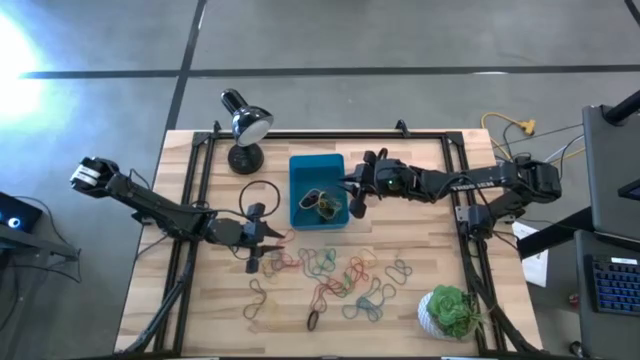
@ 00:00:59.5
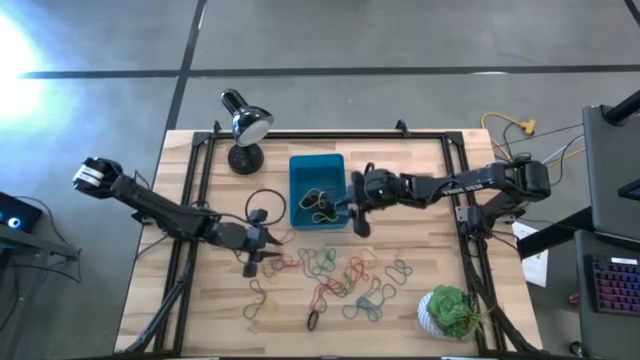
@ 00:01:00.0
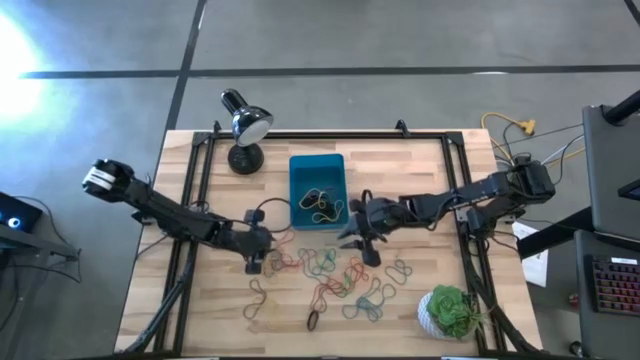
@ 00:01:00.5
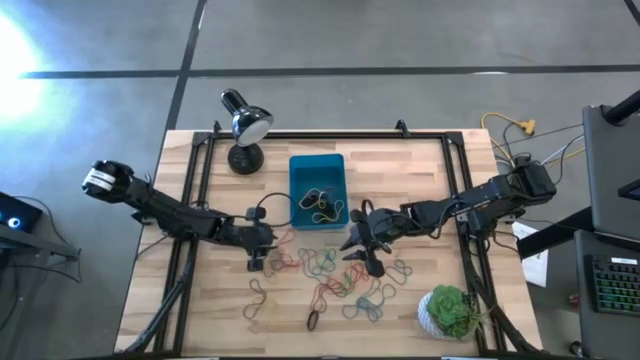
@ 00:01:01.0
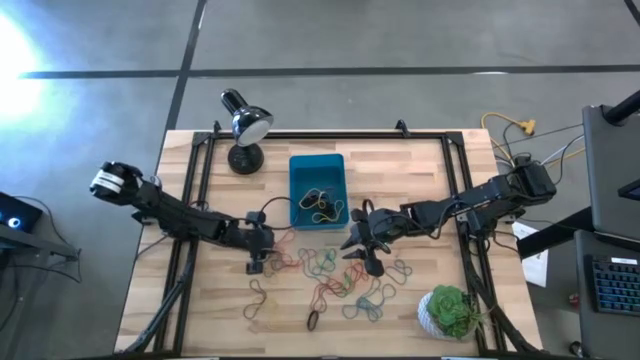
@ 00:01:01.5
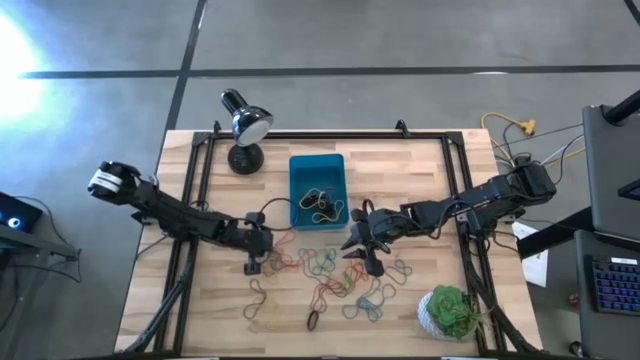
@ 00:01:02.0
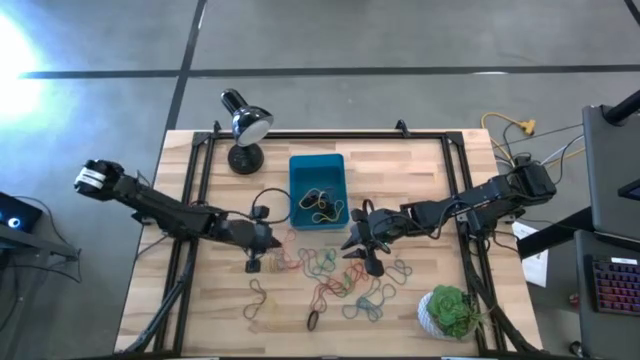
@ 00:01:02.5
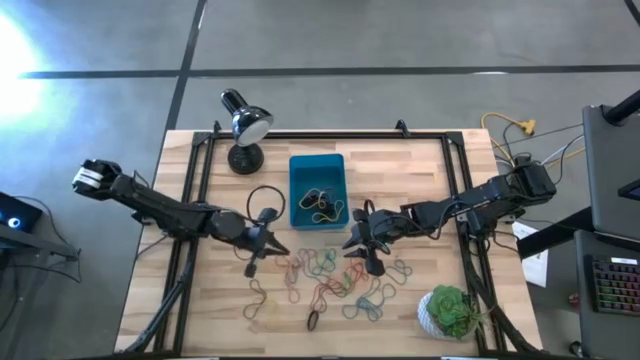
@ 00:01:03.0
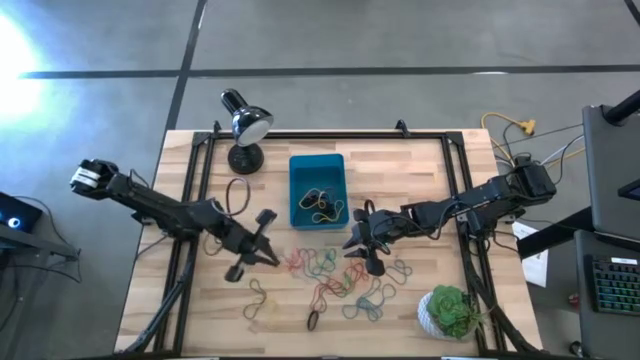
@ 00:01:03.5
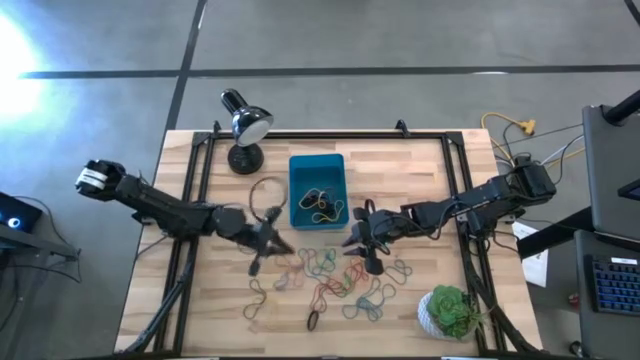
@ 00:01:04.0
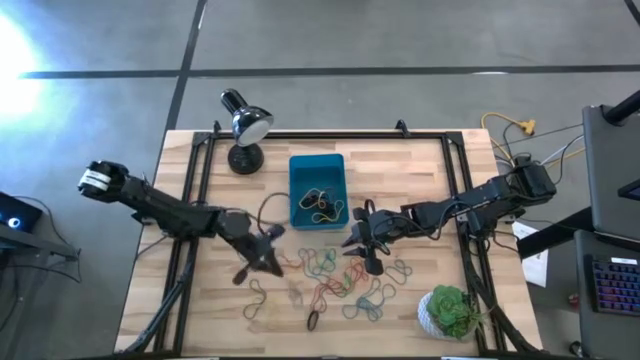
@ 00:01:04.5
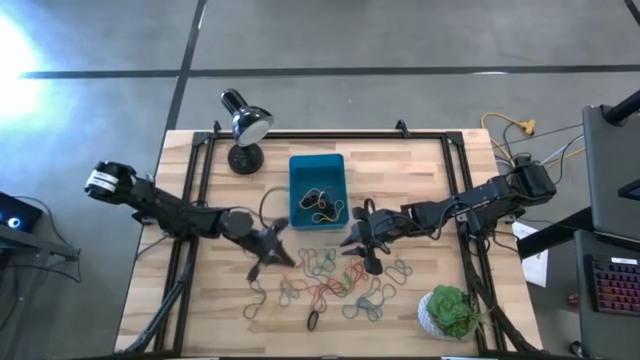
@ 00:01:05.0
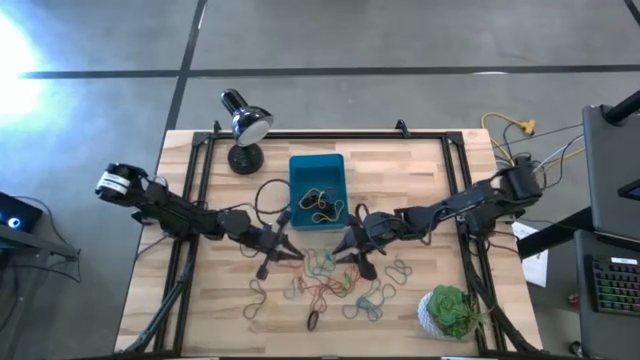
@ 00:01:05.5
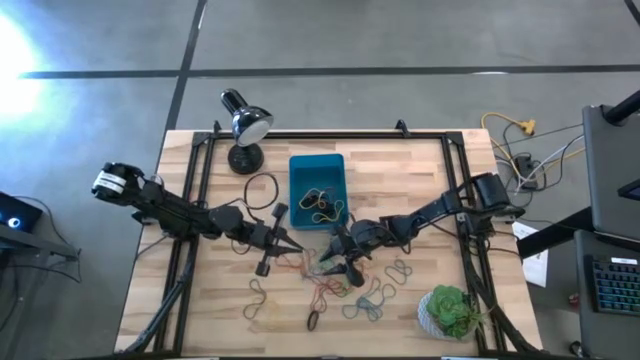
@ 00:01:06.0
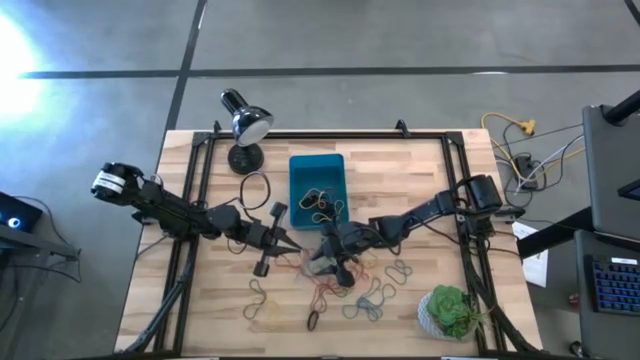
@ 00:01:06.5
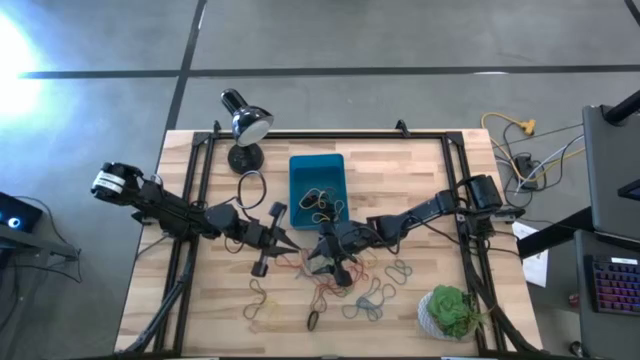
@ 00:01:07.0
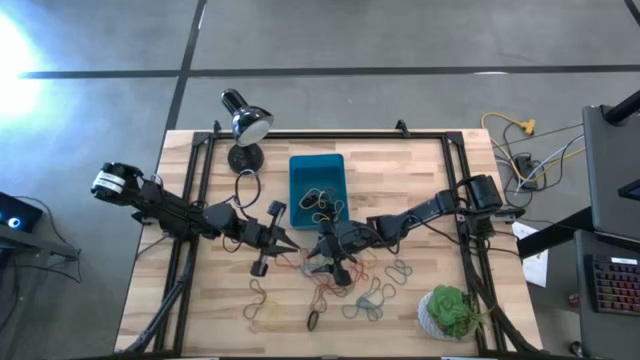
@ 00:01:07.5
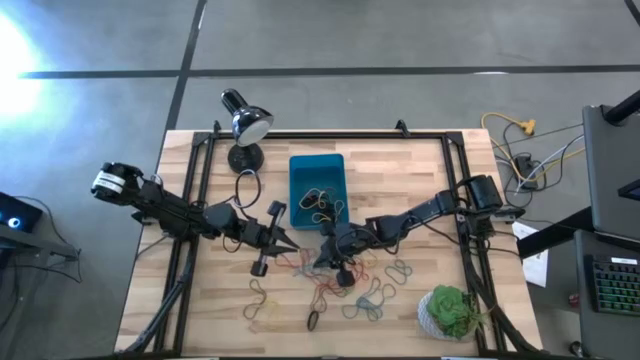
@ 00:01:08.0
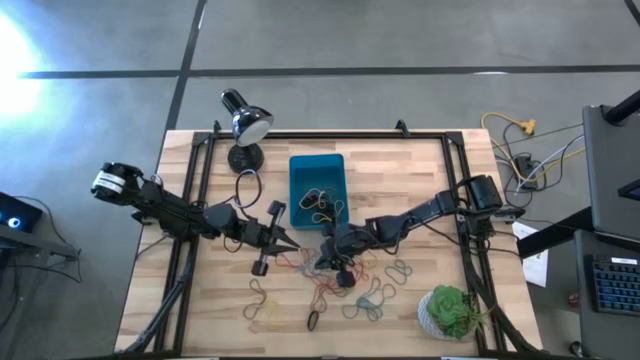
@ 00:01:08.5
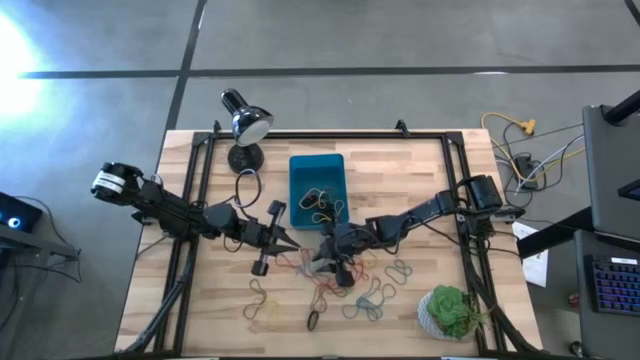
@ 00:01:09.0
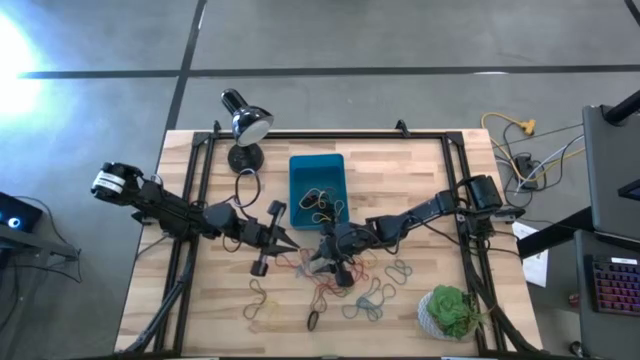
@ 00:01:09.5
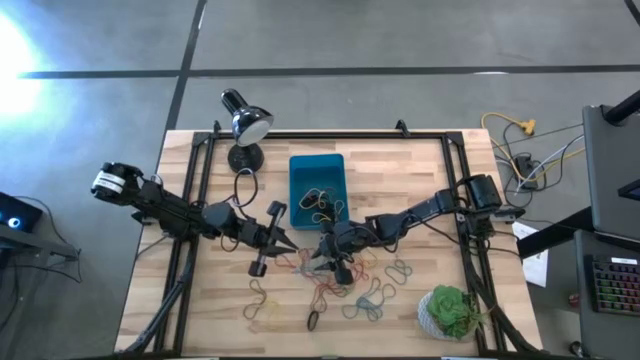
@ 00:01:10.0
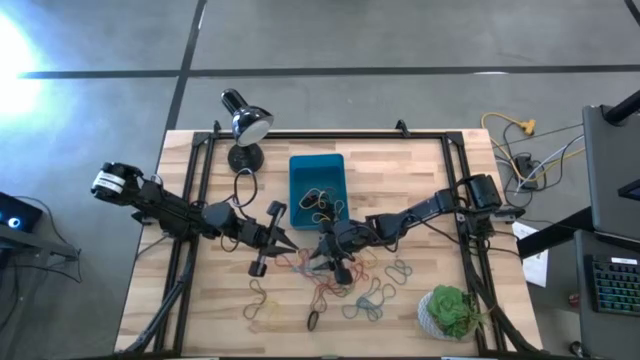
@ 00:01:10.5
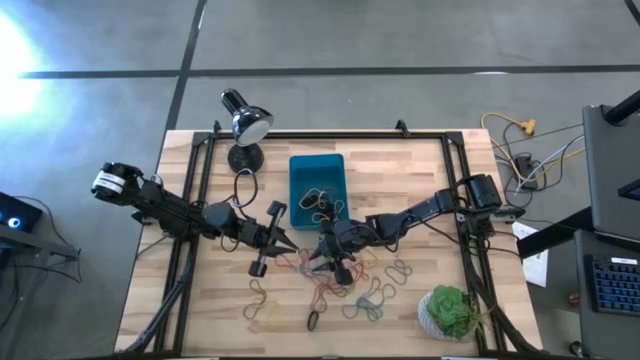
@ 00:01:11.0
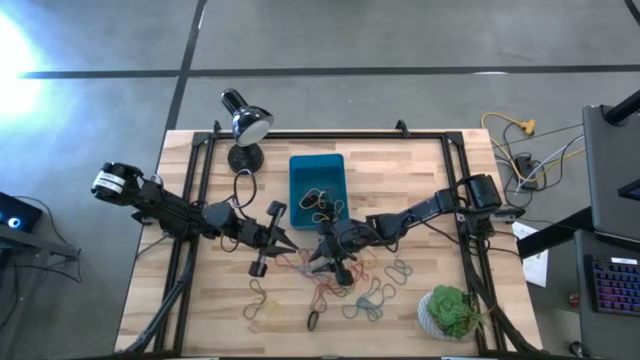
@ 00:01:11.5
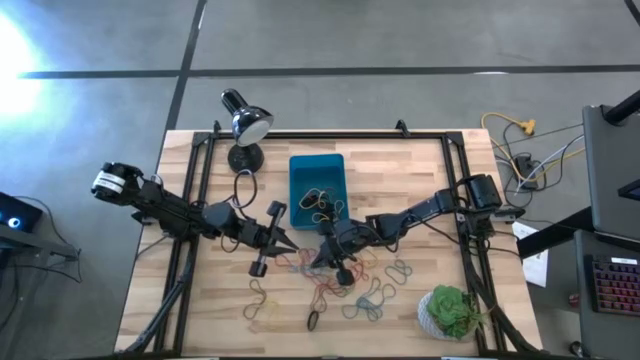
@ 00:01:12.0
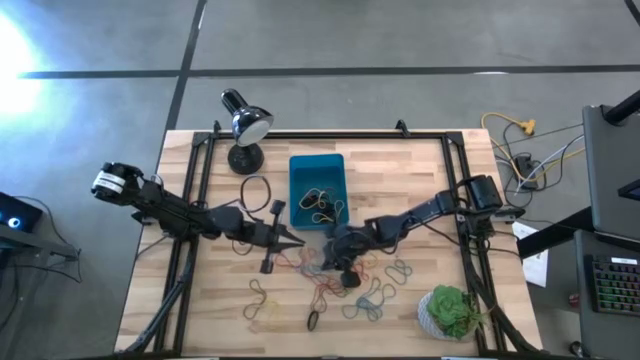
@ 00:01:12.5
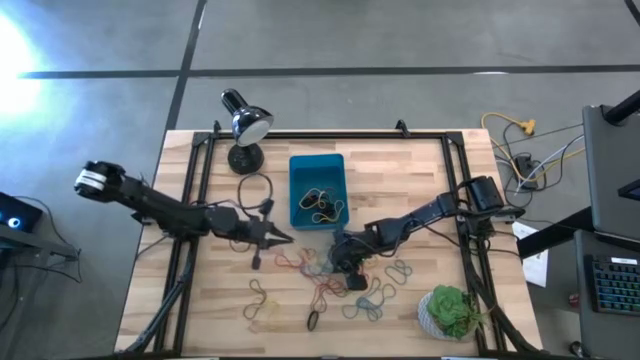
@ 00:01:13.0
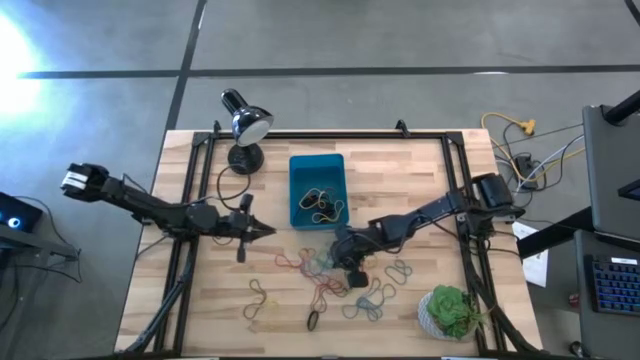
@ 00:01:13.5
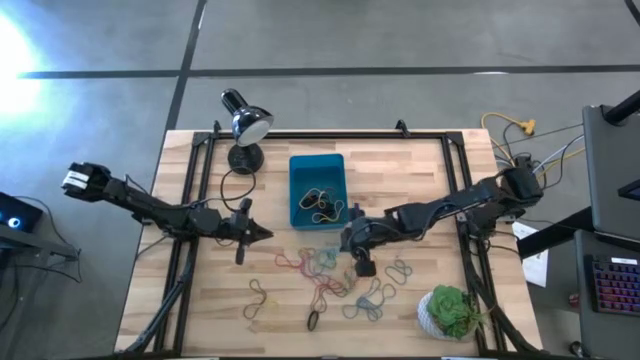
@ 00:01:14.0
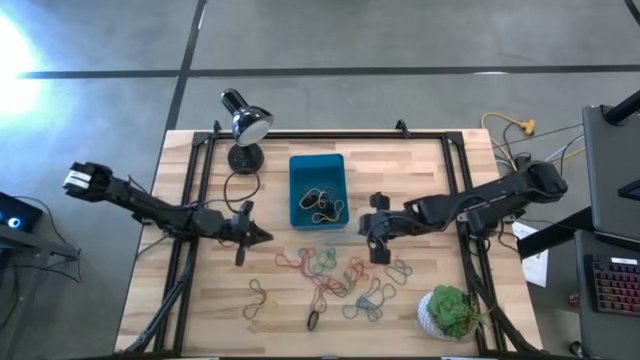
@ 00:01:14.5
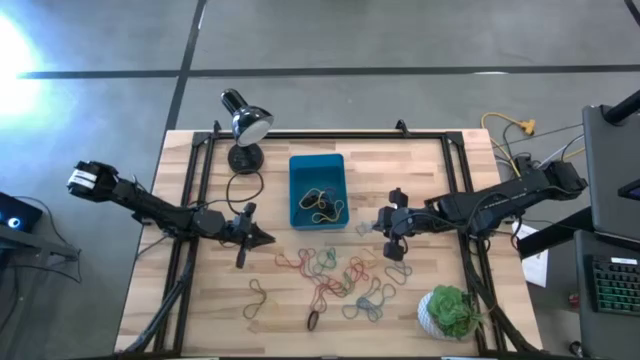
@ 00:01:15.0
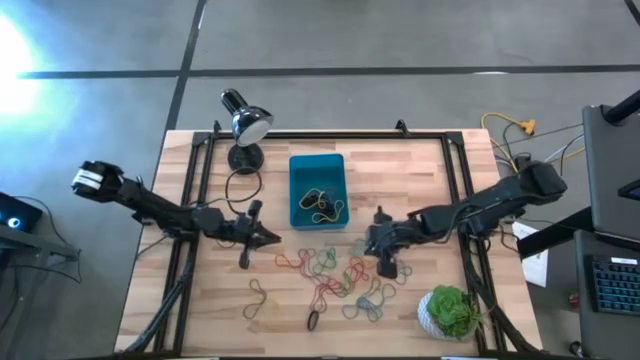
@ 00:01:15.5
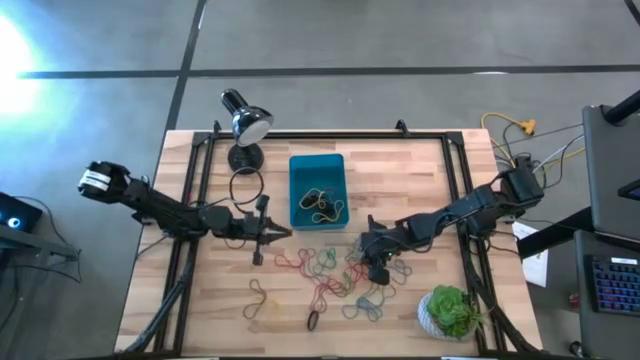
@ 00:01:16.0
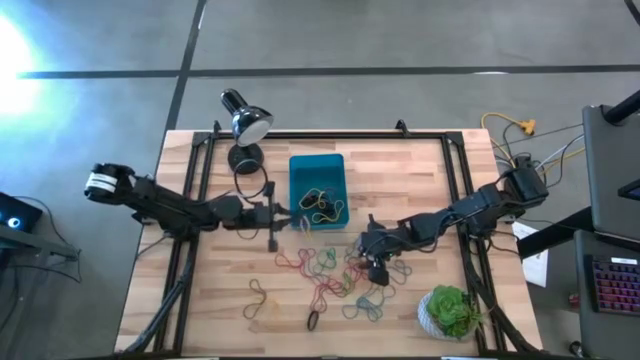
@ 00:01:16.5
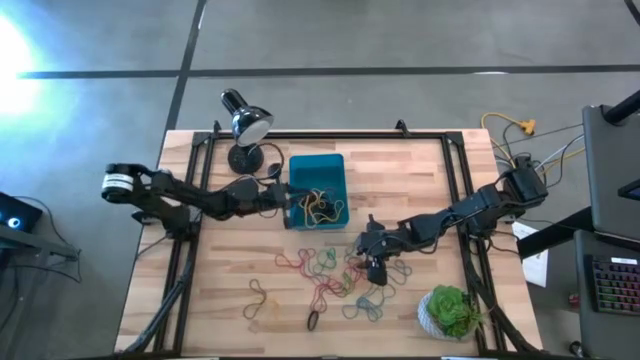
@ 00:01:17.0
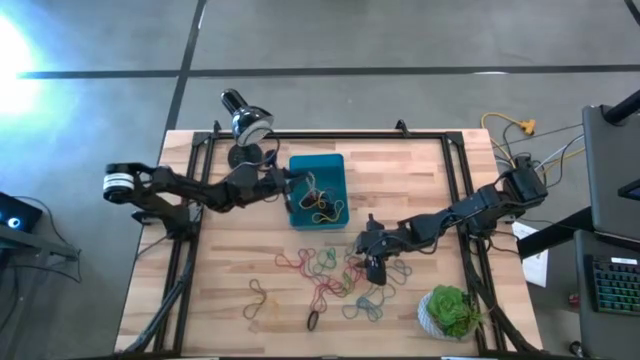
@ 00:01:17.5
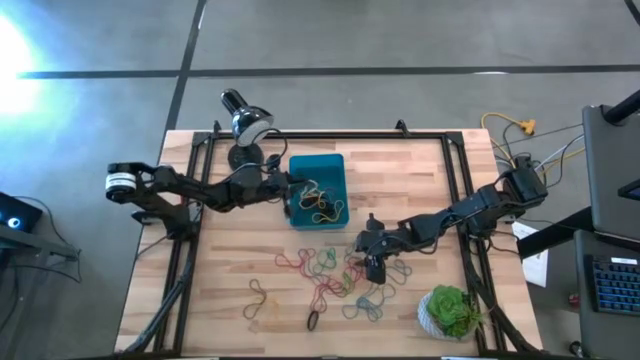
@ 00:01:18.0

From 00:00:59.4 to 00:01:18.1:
Task: Pick and place rubber bands into bin
Put the yellow rubber band into the blue bin

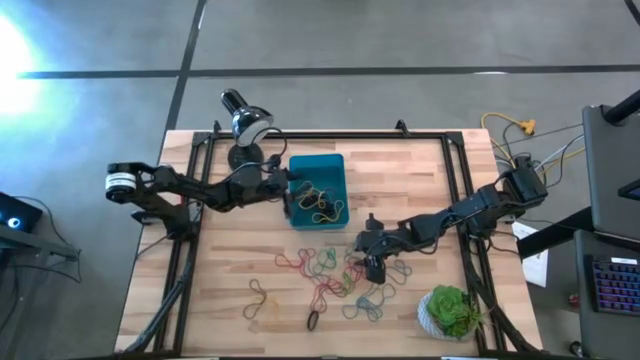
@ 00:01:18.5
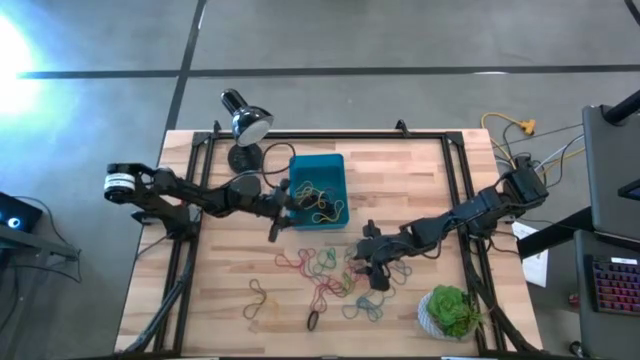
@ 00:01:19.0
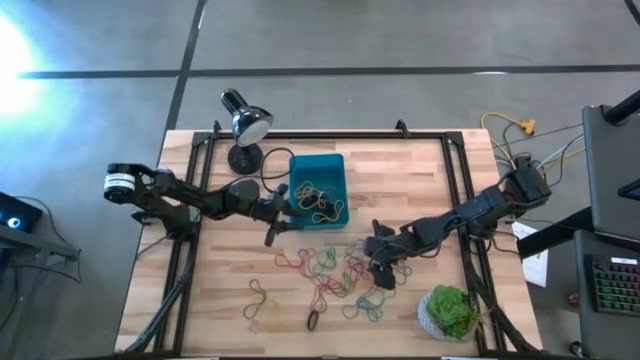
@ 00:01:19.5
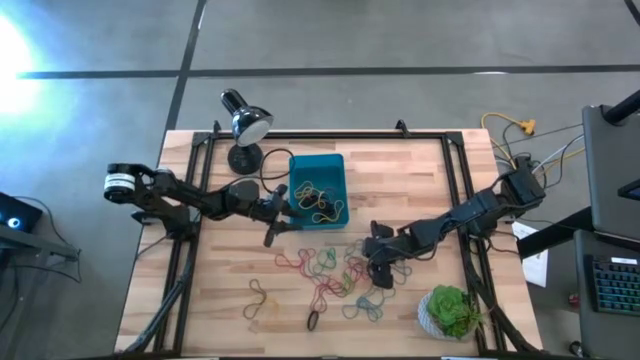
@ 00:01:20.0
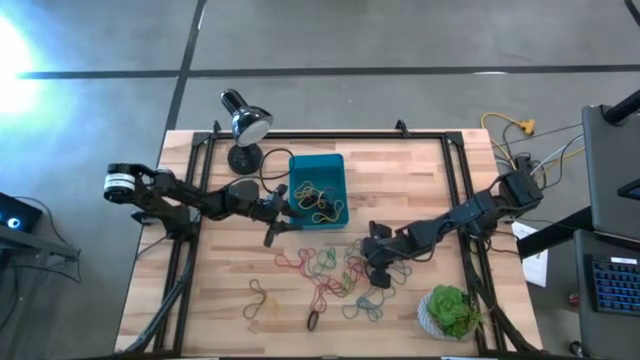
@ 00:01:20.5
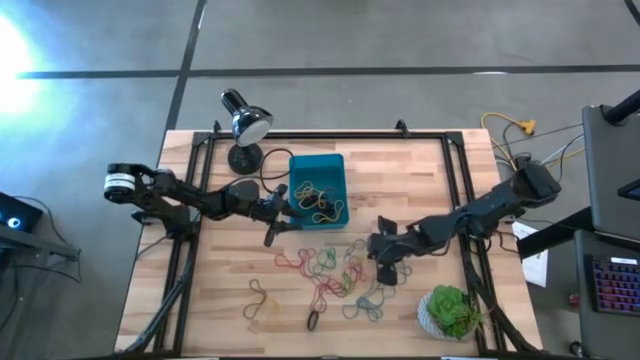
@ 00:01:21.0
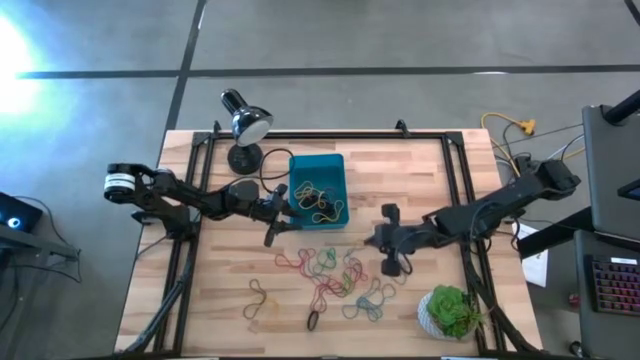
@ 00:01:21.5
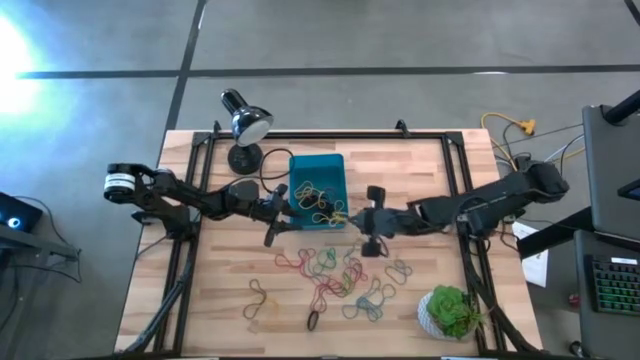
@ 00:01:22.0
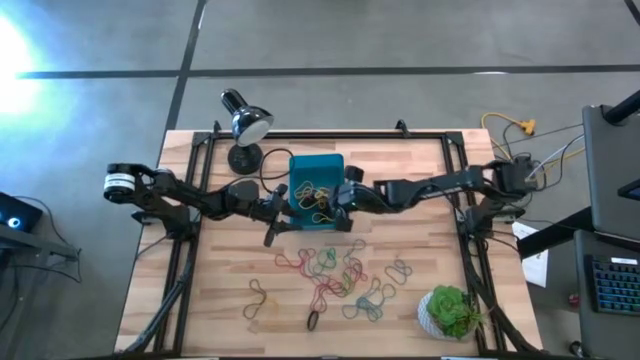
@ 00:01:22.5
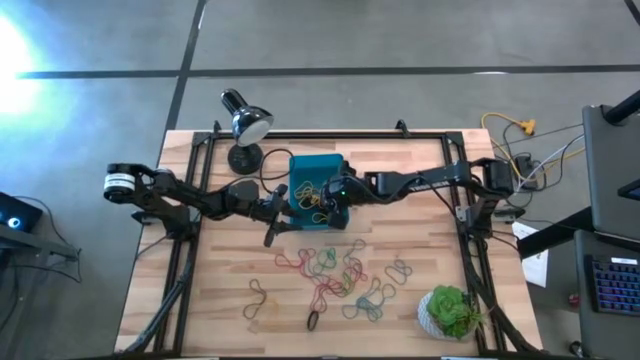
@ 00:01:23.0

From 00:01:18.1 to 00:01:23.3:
Put the yellow rubber band into the blue bin
